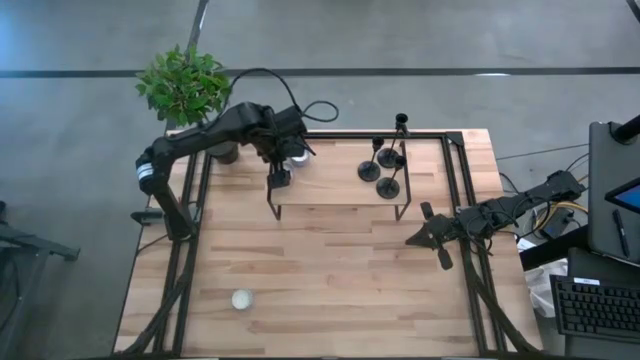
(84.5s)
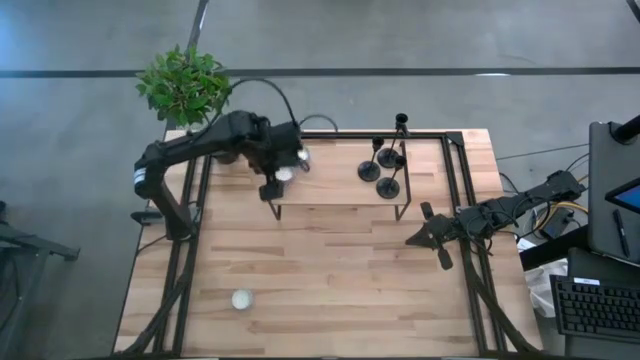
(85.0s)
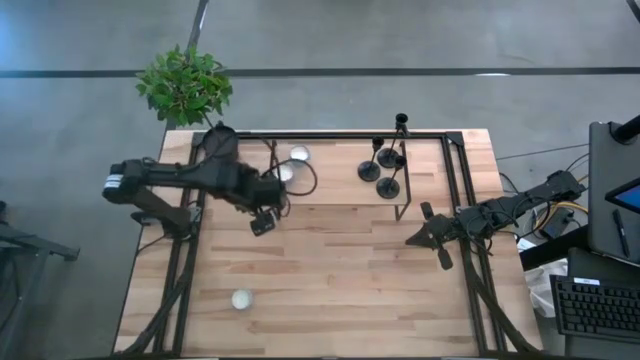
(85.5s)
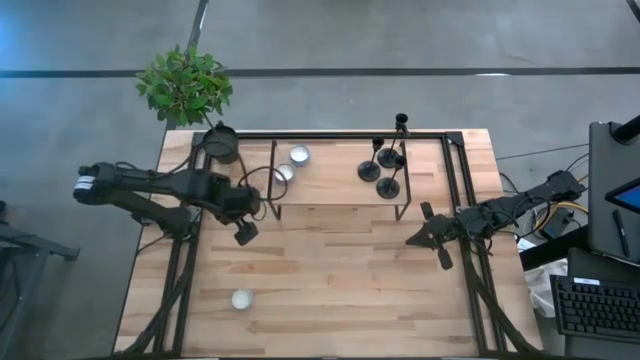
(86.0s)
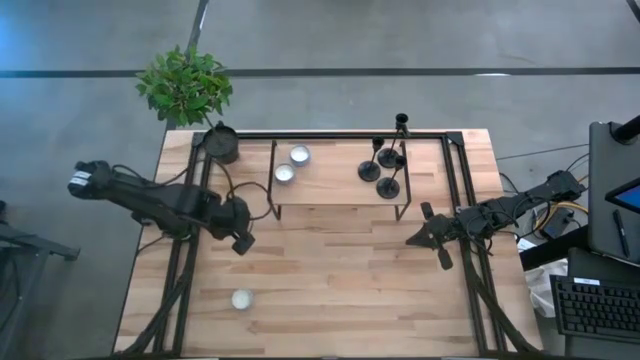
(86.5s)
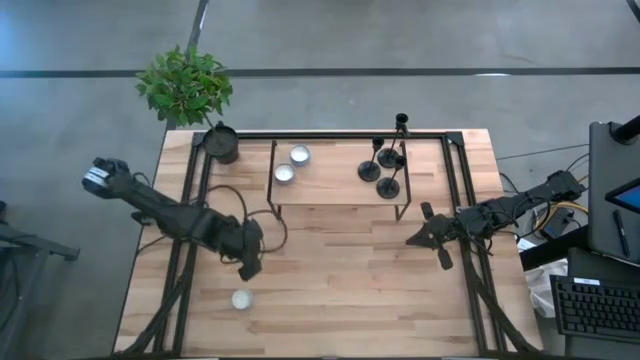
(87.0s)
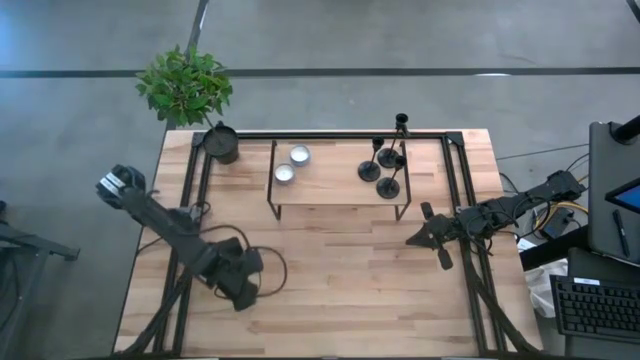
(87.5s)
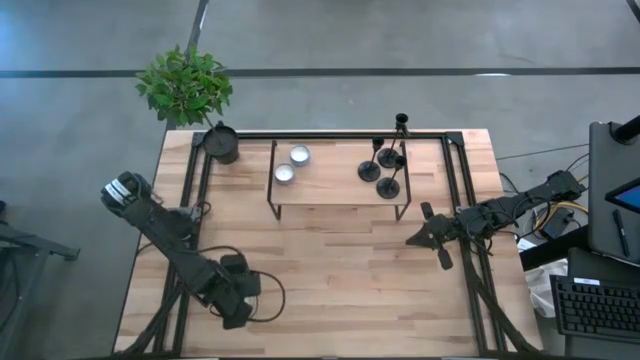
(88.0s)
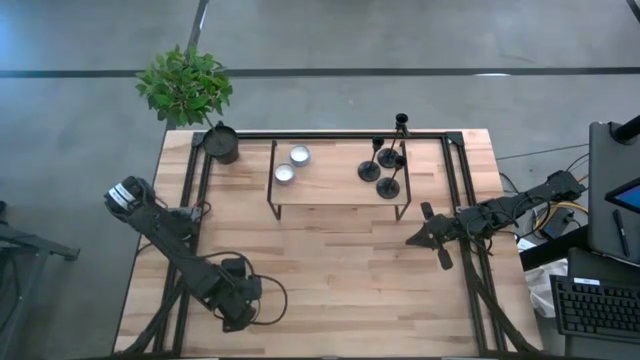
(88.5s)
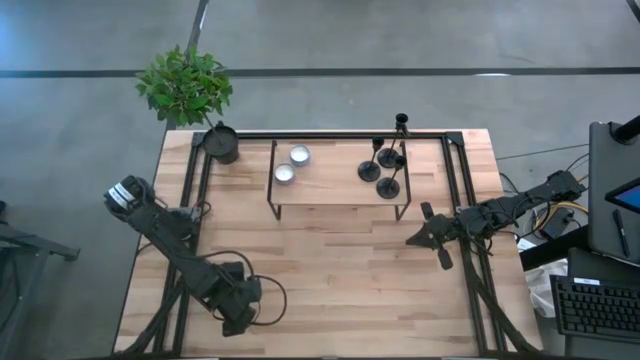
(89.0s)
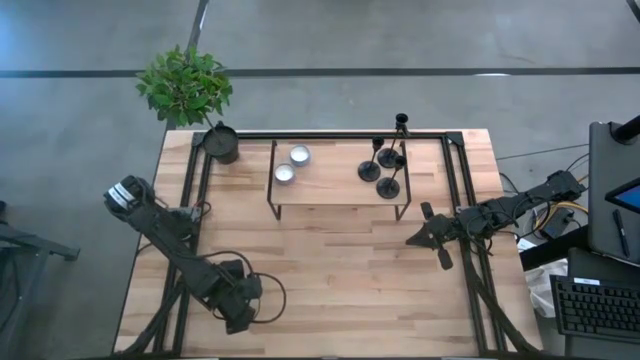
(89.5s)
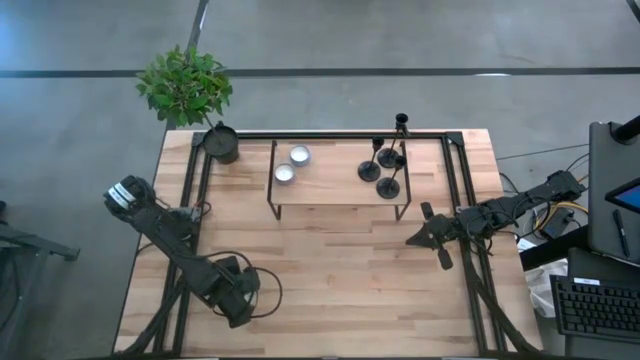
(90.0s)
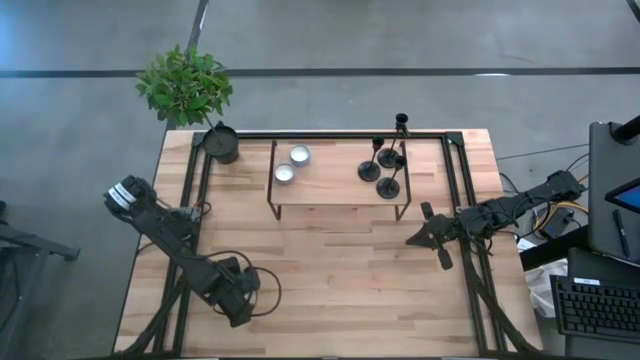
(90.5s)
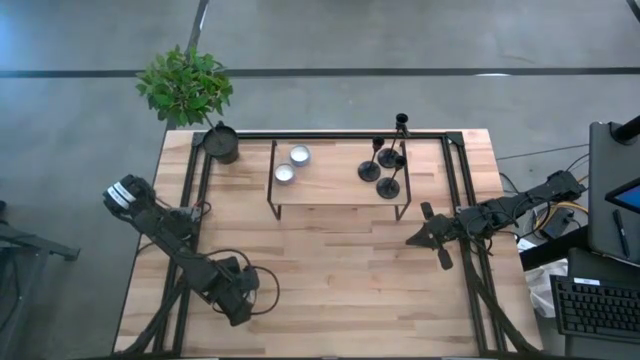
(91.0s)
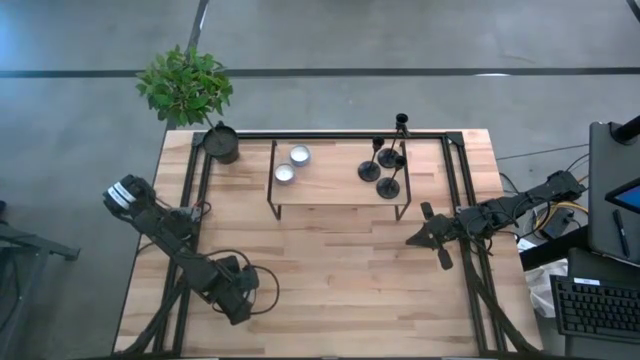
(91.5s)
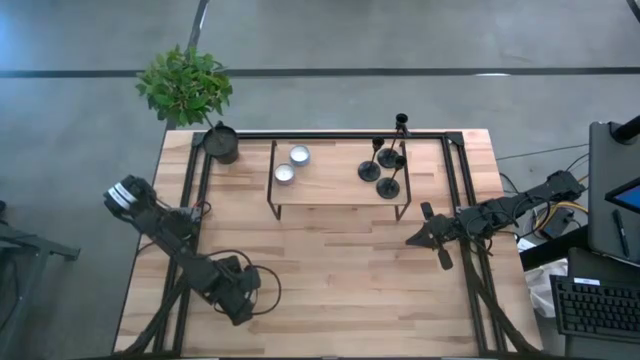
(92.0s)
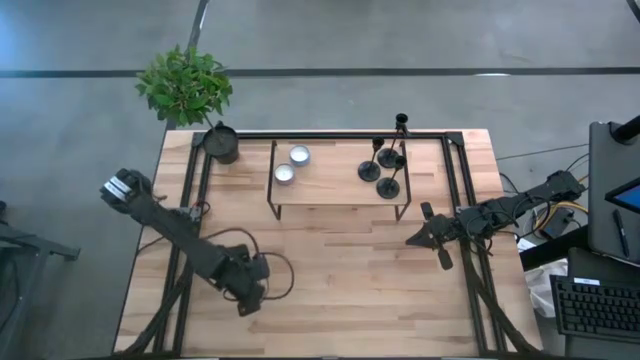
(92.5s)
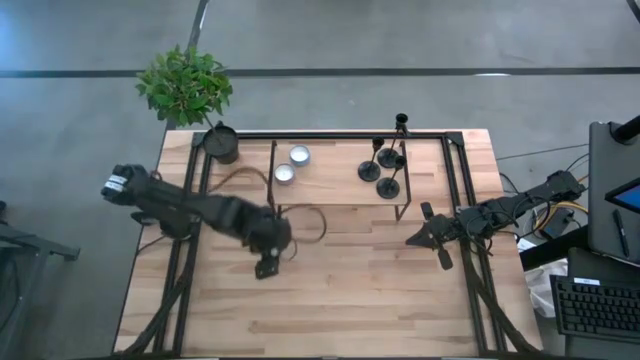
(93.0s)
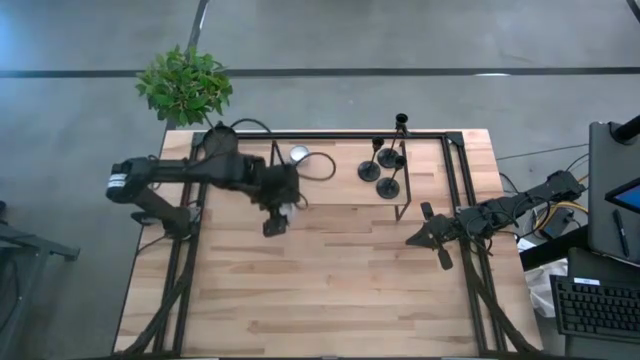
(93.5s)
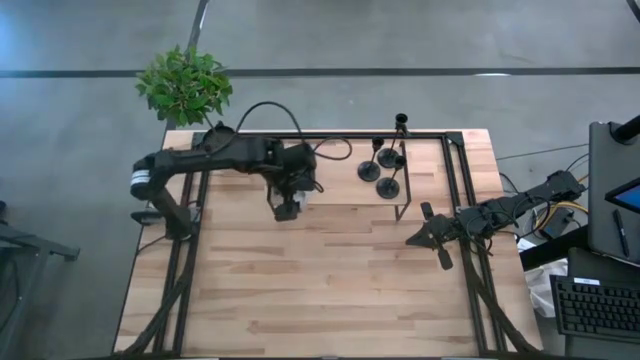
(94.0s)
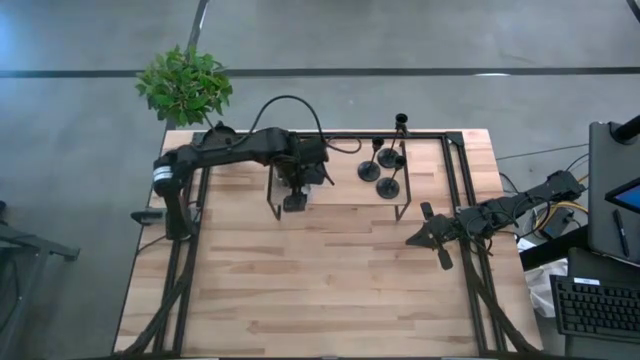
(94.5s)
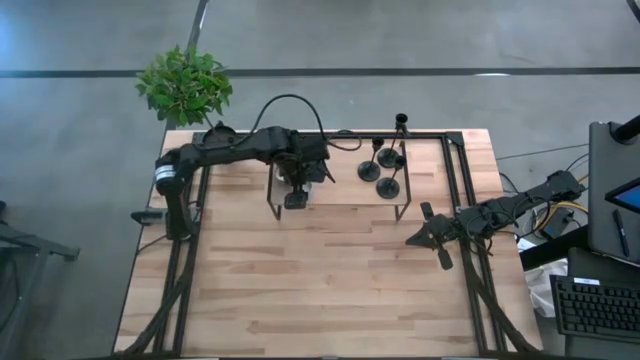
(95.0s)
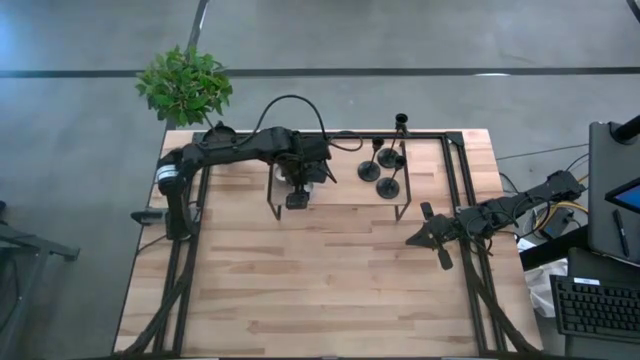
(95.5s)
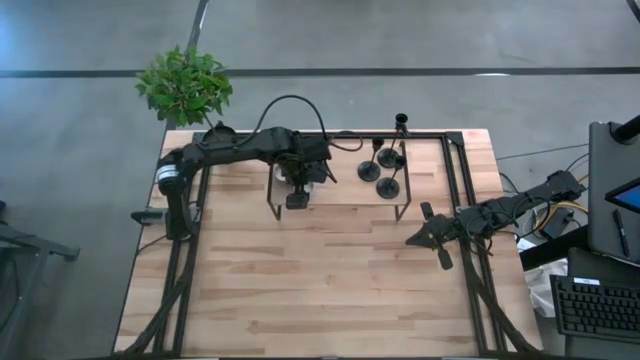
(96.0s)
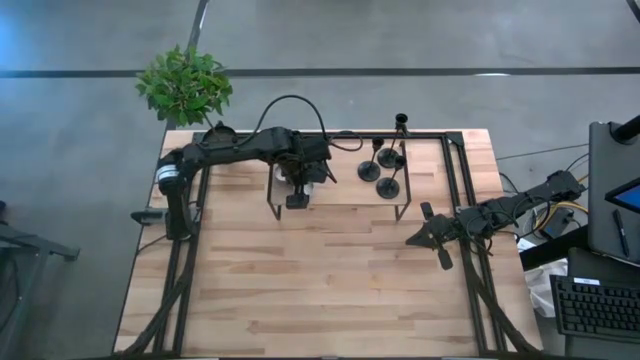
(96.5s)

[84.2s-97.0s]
Task: Pick & Place candle stick holders
Put the red scented candle on the shelf

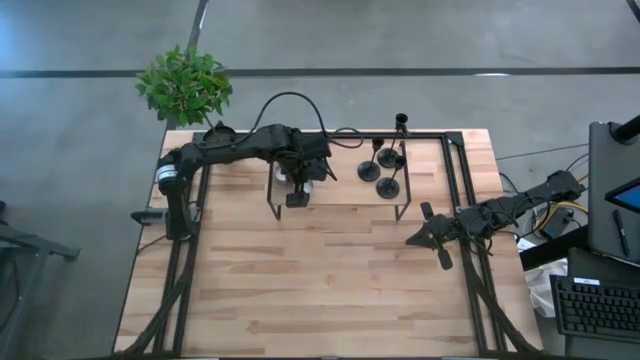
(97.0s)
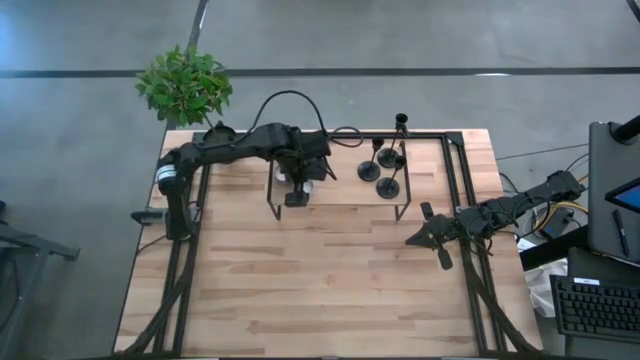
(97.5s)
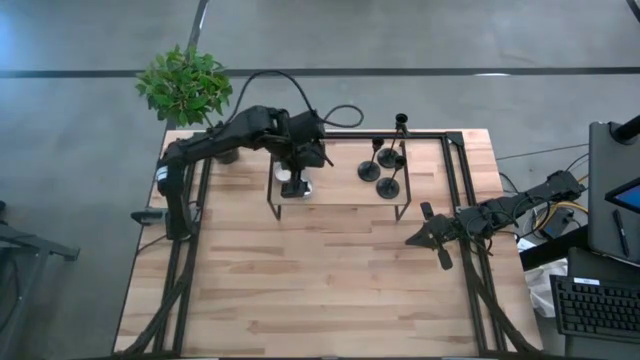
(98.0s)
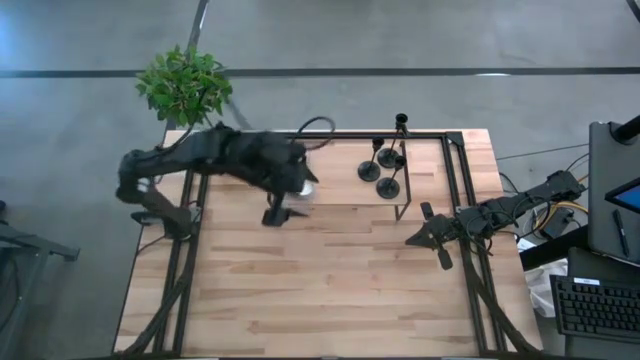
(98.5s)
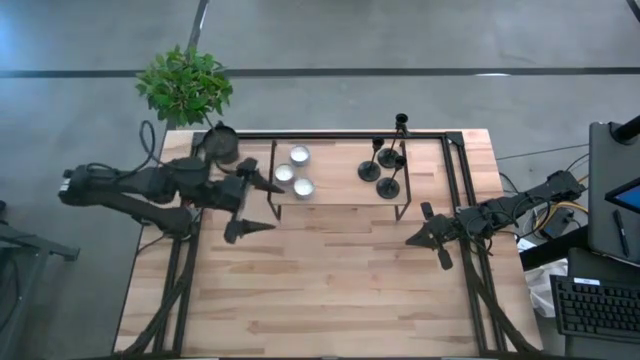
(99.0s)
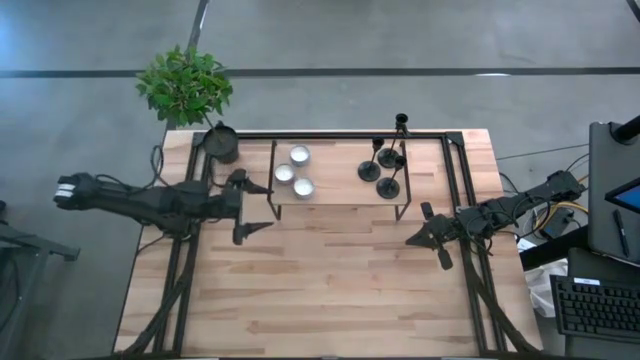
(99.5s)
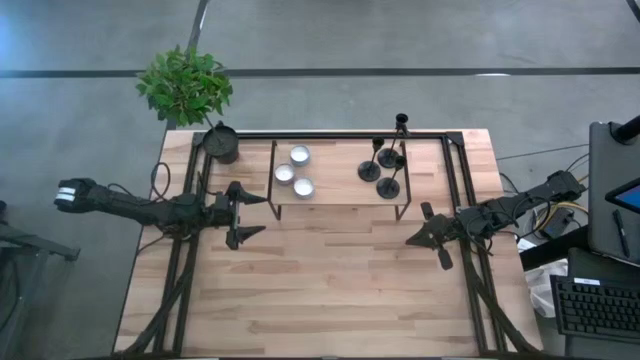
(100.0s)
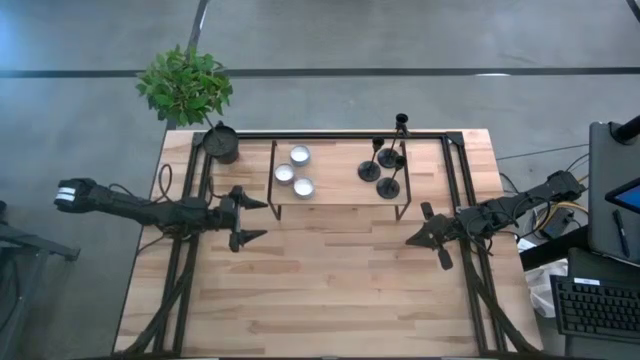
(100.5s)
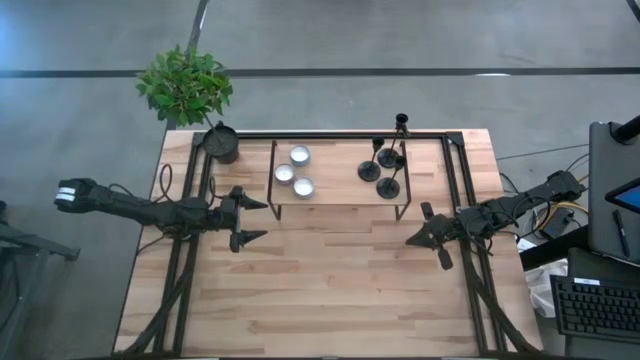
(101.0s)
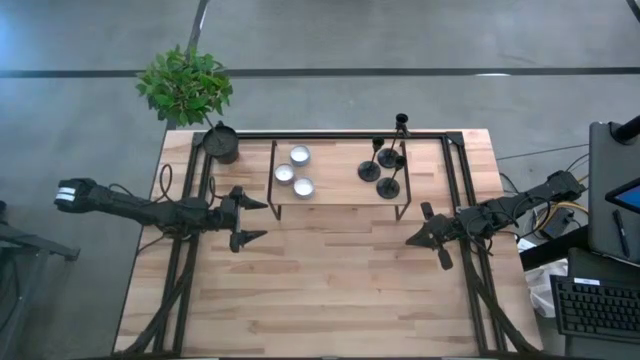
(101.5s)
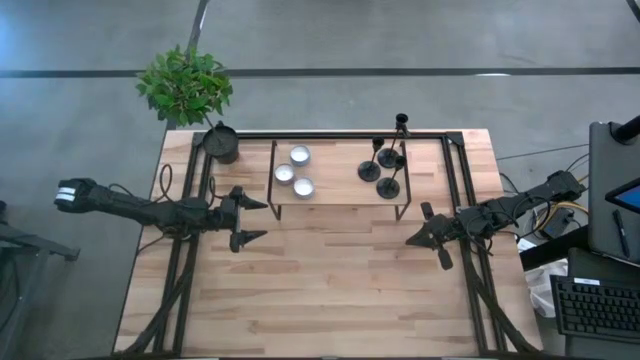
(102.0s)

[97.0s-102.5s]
Return to Home Position
